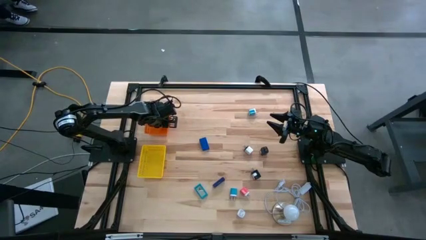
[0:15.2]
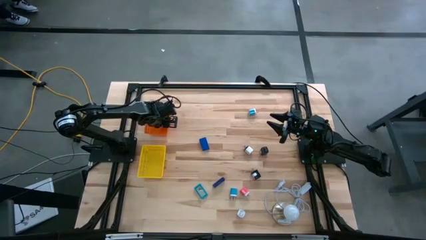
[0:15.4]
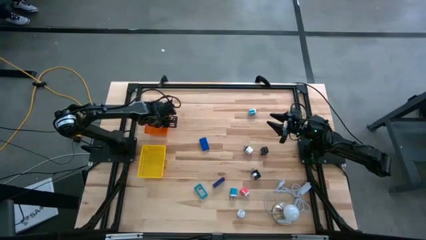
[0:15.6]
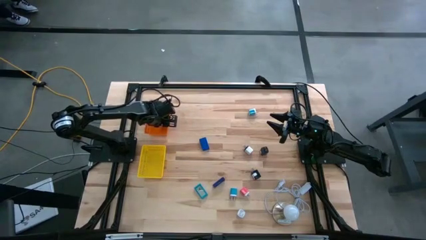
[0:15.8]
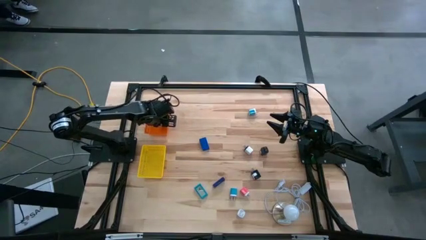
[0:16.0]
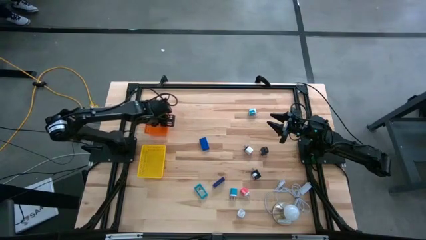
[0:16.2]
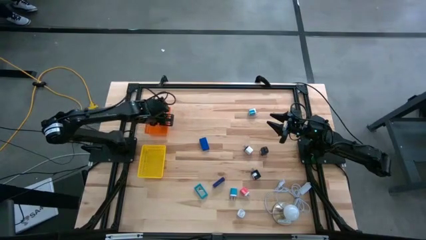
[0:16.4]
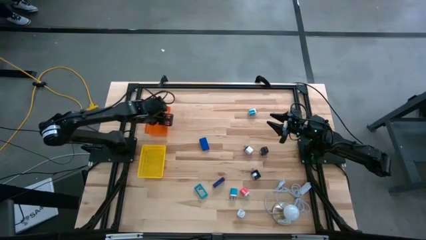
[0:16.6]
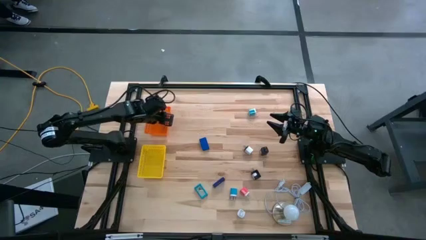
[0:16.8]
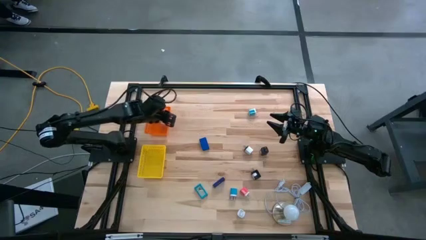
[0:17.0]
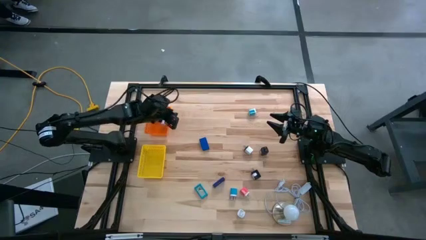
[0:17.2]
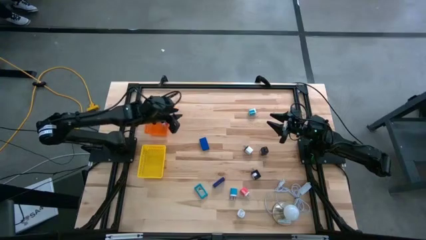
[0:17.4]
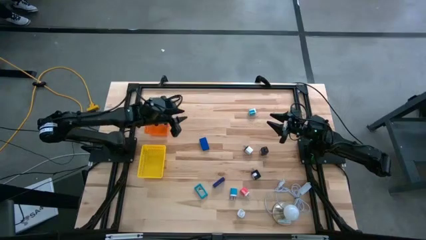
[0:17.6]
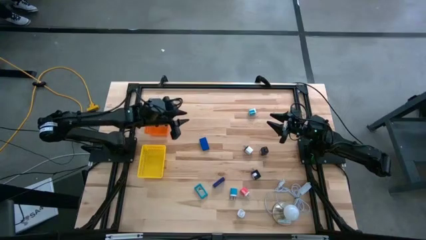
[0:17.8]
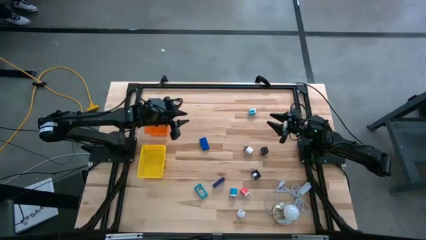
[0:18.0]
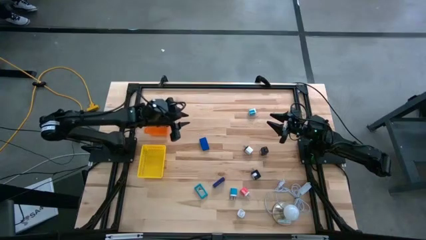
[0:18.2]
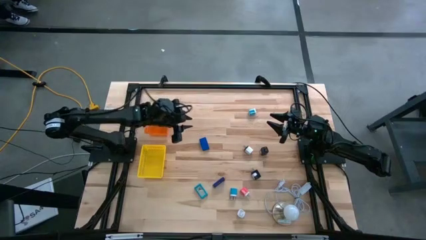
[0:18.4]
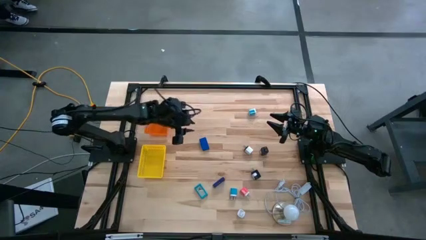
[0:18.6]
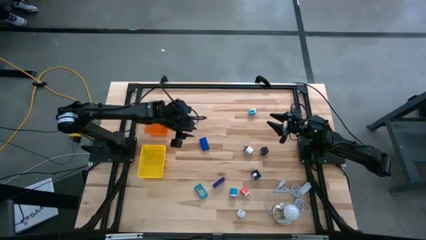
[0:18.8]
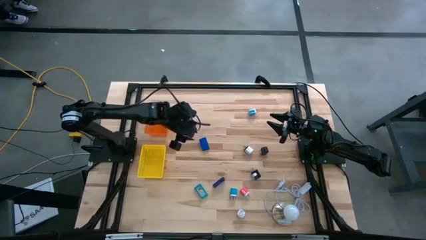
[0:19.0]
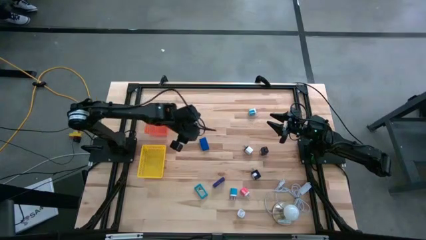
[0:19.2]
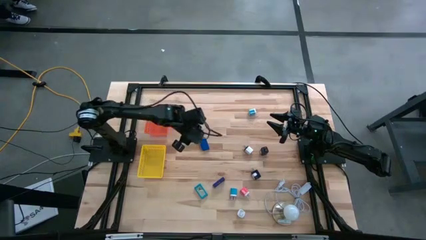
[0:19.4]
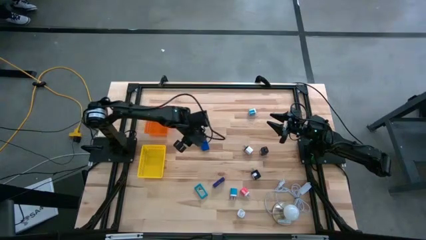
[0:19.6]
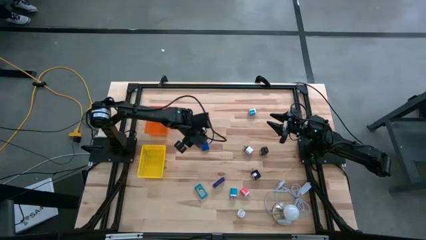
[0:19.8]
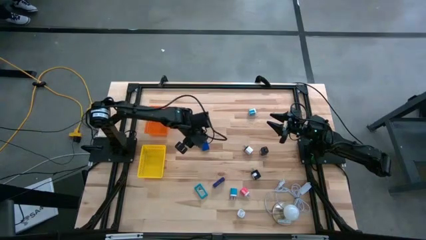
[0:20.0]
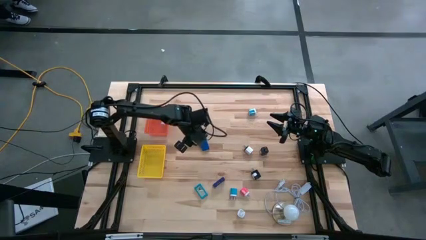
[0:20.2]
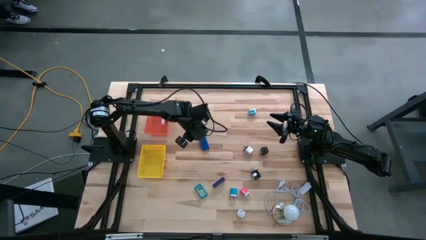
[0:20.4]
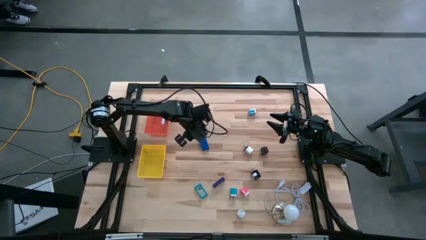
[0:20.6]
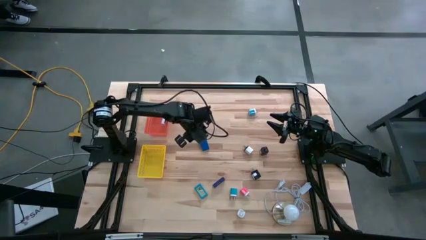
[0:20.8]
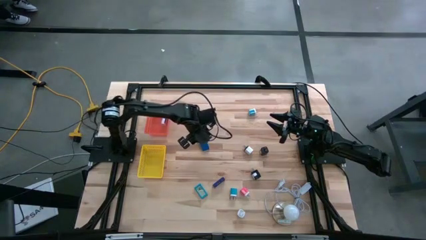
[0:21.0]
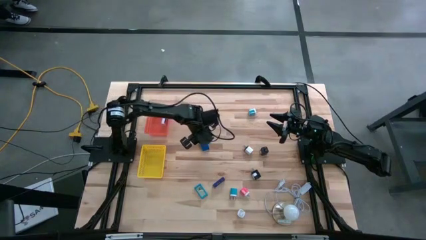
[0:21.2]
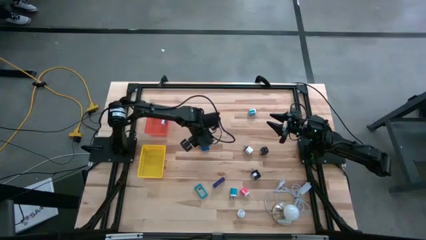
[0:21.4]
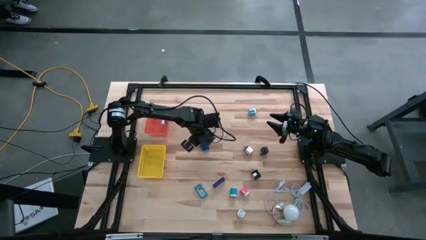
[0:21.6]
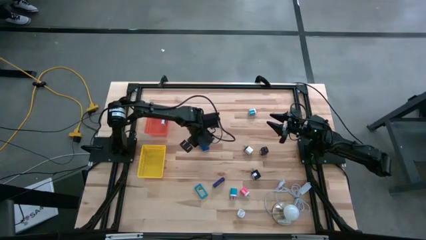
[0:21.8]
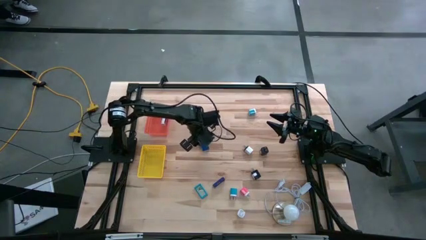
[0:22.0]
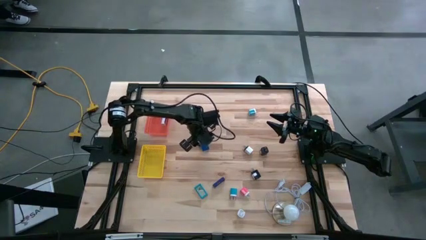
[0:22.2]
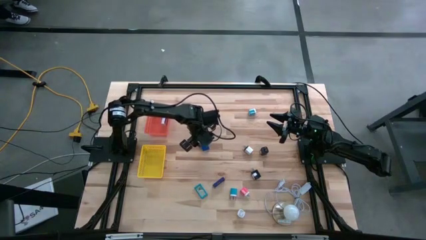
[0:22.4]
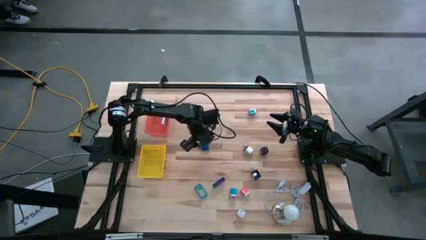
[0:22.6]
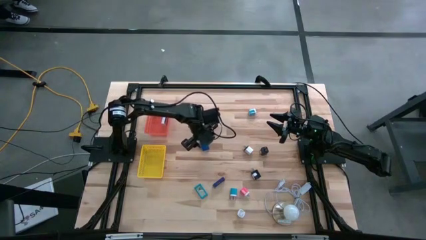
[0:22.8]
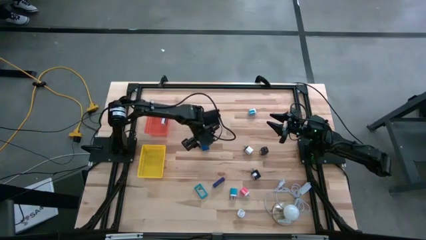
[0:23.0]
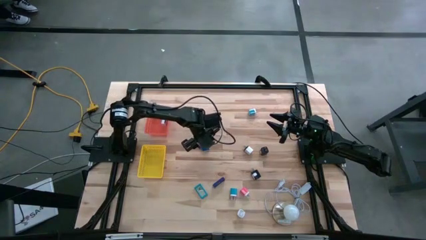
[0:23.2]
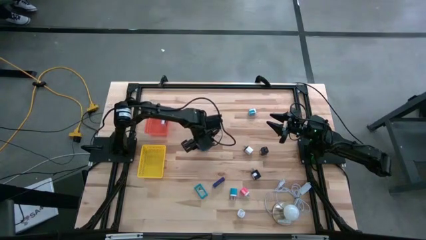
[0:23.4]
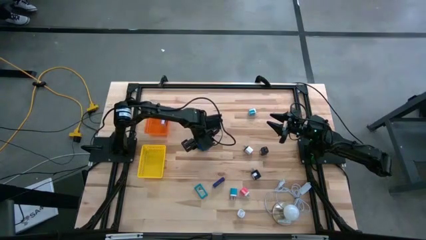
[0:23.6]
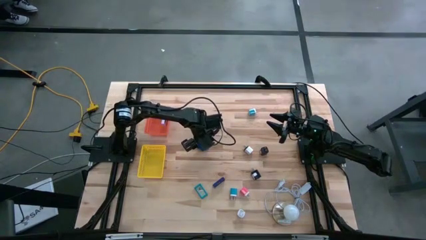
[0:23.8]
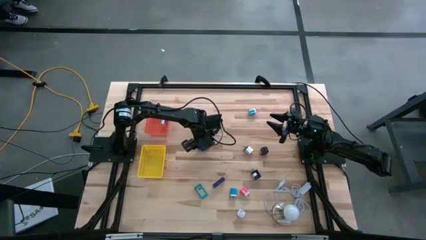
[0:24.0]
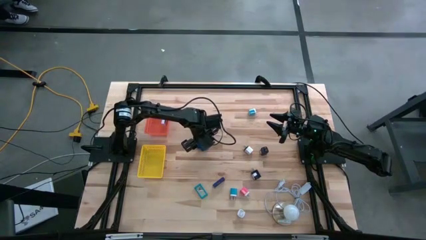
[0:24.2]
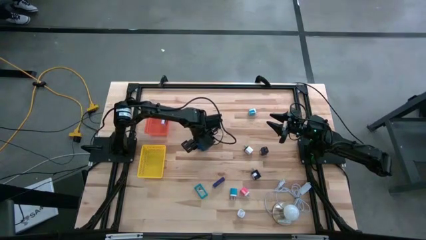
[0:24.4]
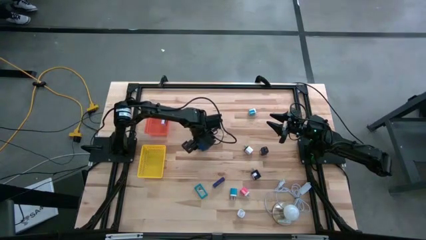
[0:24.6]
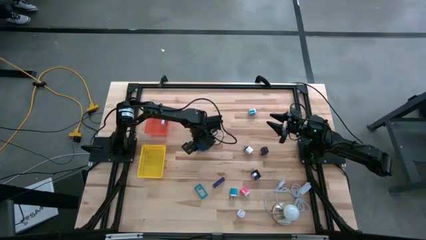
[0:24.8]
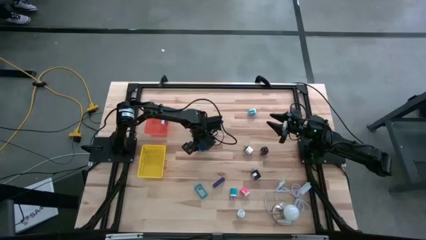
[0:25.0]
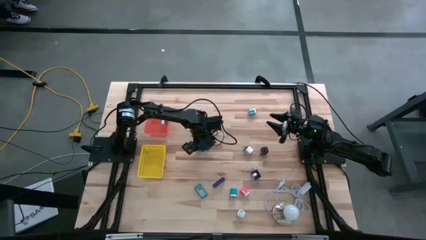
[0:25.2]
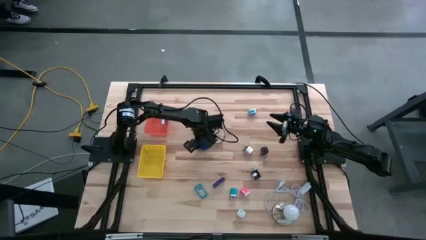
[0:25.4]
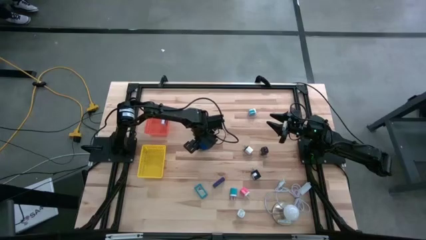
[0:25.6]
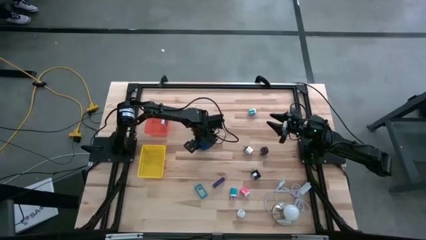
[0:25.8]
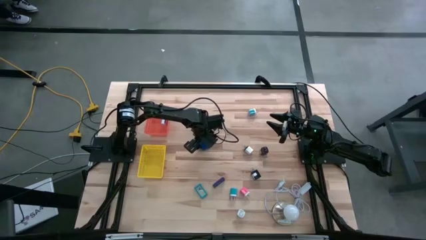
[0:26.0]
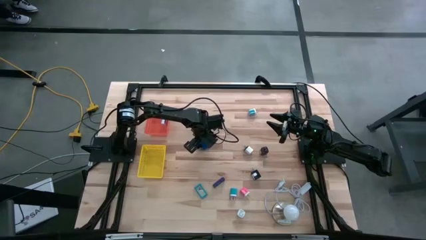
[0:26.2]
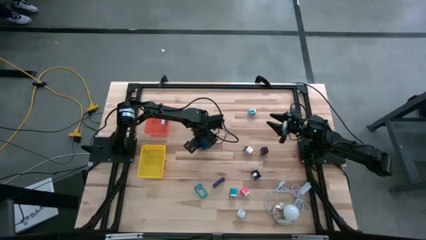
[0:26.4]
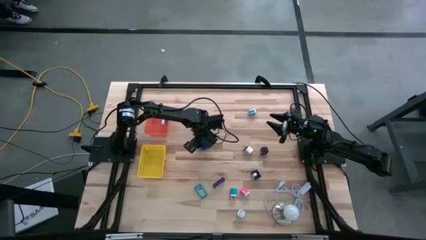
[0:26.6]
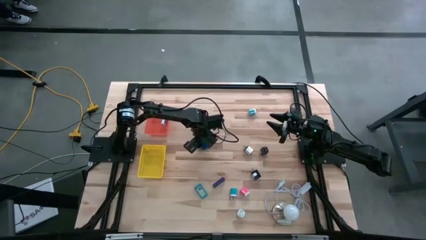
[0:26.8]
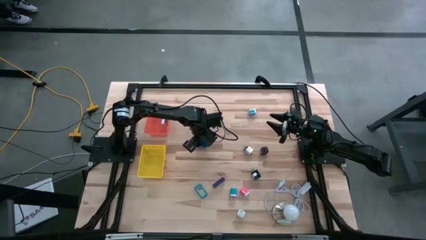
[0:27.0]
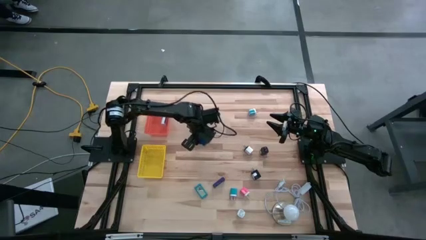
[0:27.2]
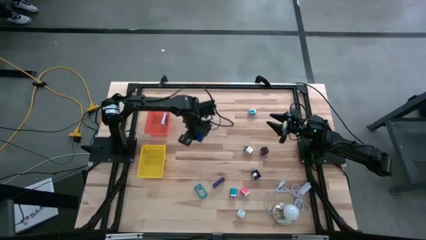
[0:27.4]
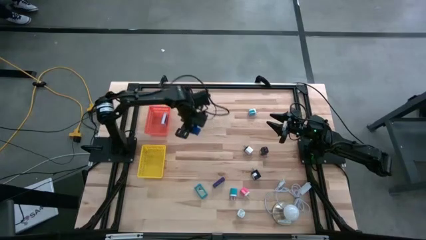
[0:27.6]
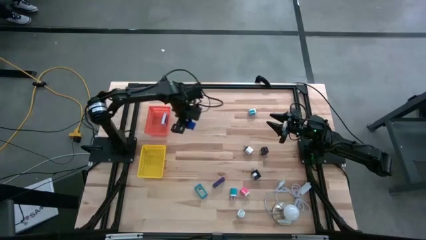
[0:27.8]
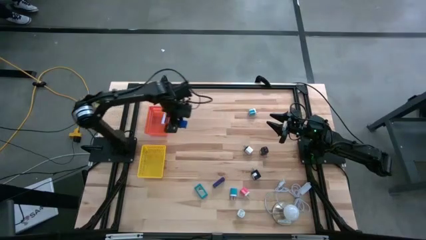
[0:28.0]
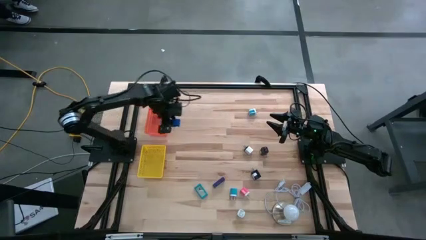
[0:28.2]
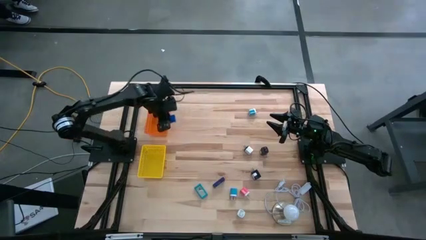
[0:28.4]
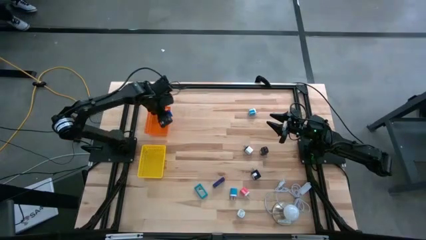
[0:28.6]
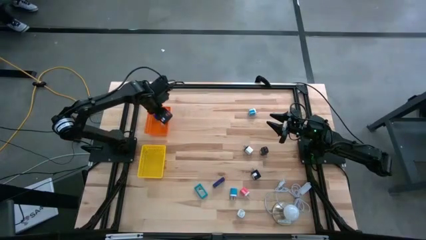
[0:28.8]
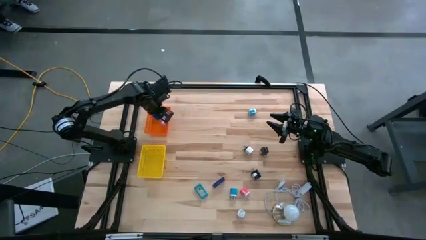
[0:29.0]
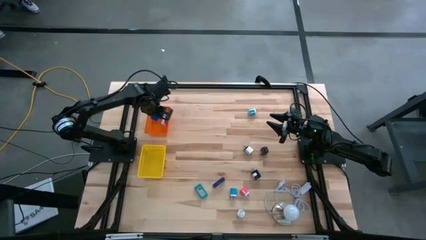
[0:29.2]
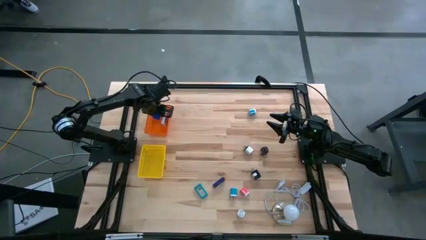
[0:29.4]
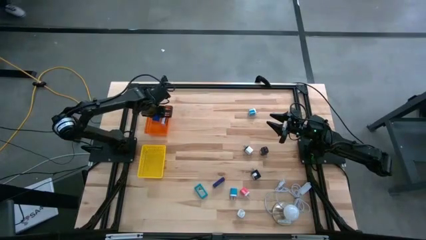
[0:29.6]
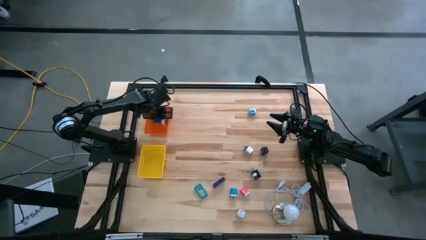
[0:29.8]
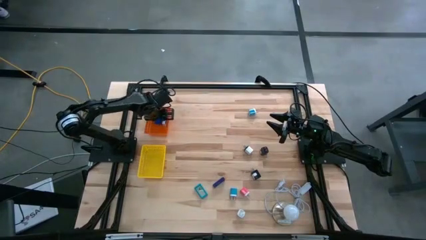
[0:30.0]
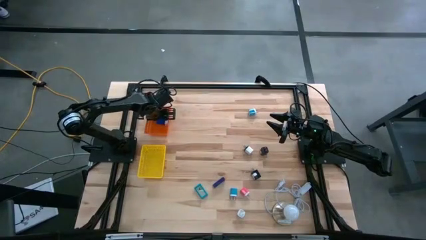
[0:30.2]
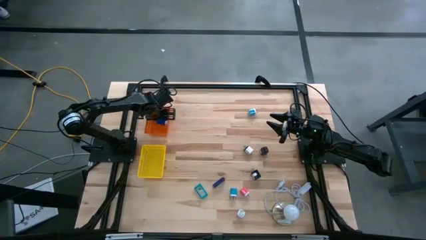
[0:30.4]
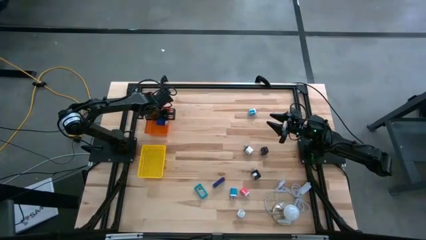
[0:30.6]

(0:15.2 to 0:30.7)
Task: Pick & Place Office items
Put the top dark blue timer into the orange basket
